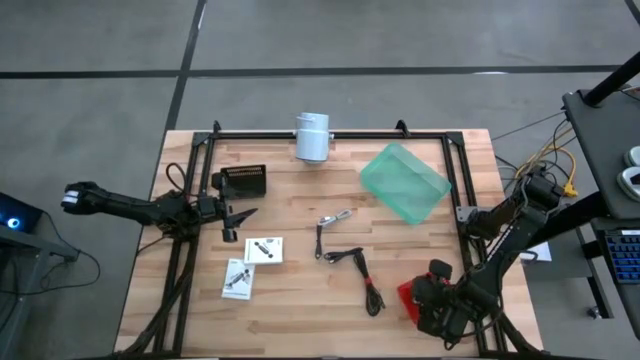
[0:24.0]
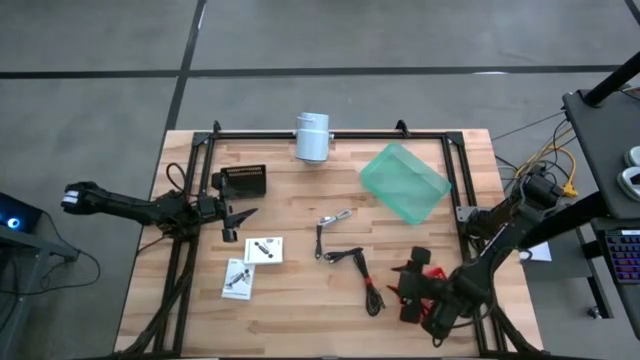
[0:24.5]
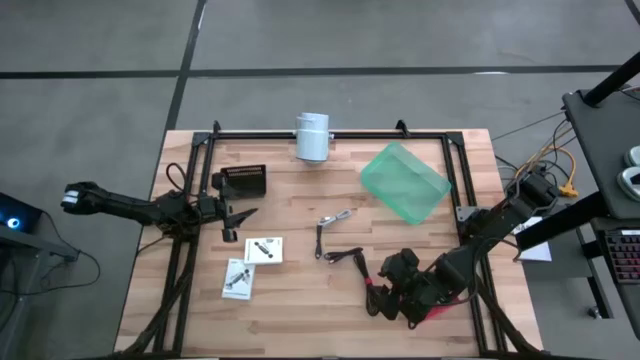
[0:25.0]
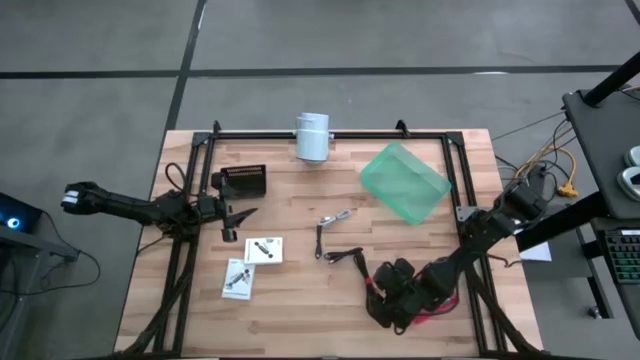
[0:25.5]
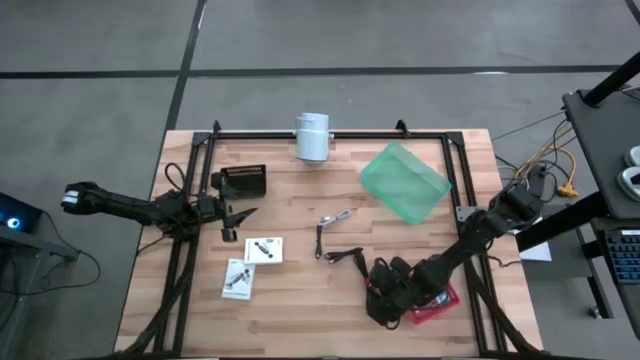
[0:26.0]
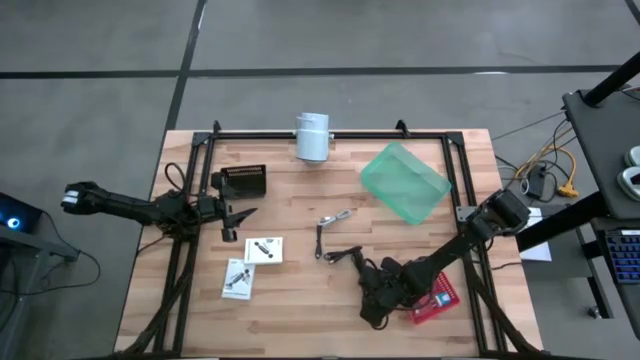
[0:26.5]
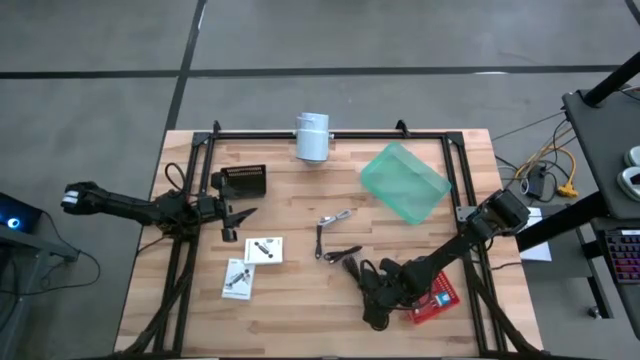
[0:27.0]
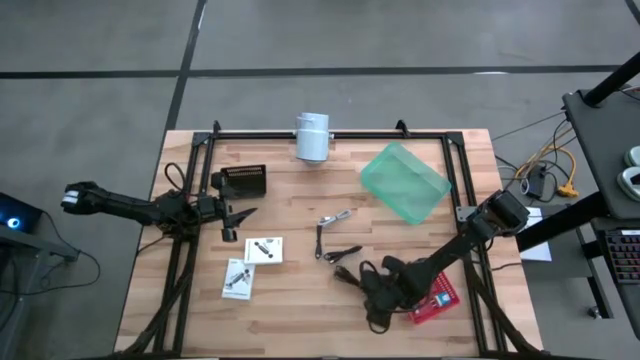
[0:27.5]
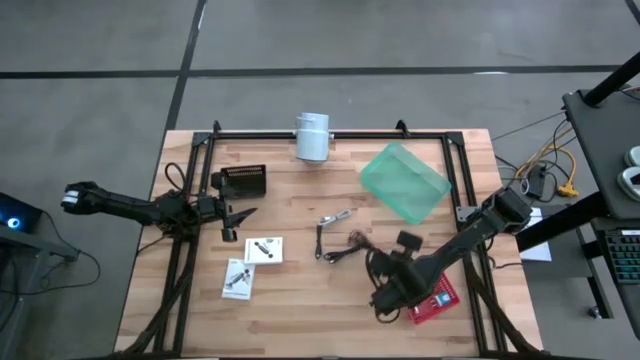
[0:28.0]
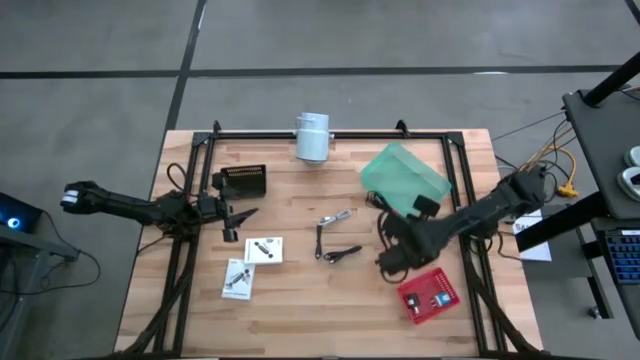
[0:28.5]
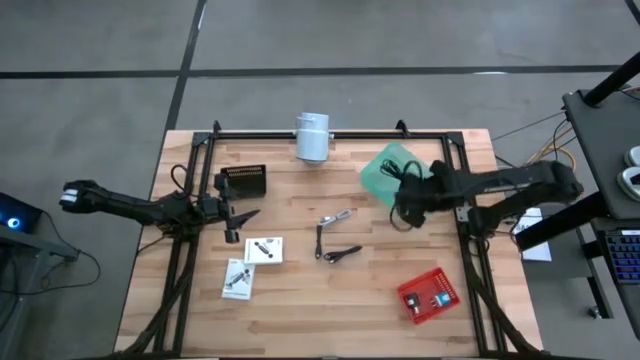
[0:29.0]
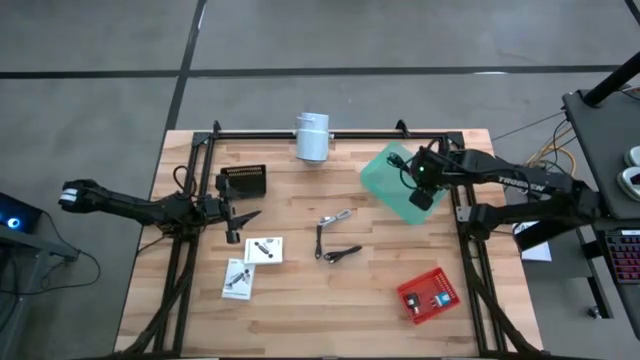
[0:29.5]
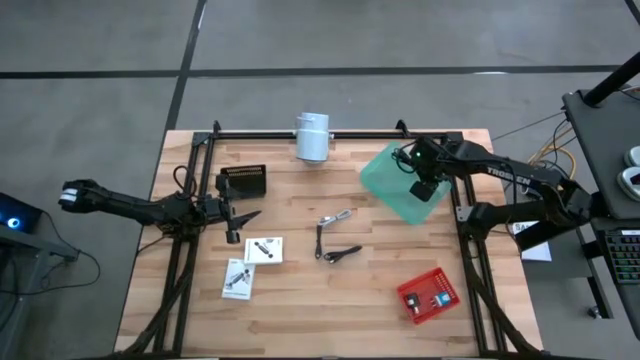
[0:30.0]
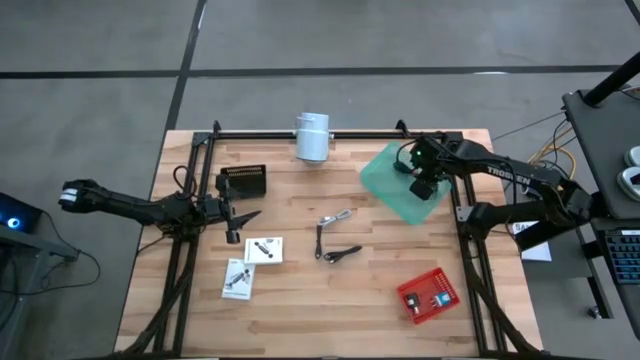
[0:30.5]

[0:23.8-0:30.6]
Task: Pick and place items into bin
Put the bottom black charger cable into the green bin

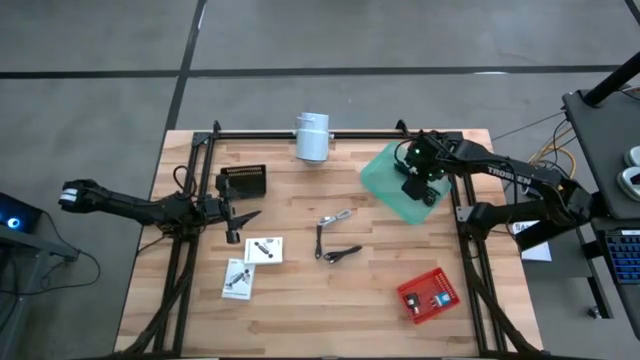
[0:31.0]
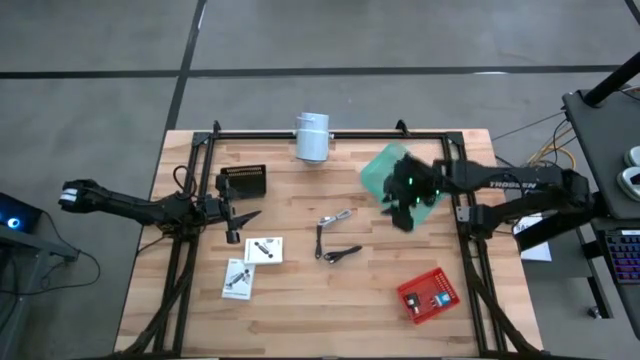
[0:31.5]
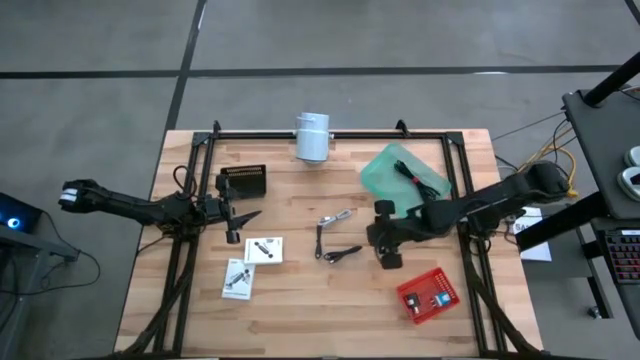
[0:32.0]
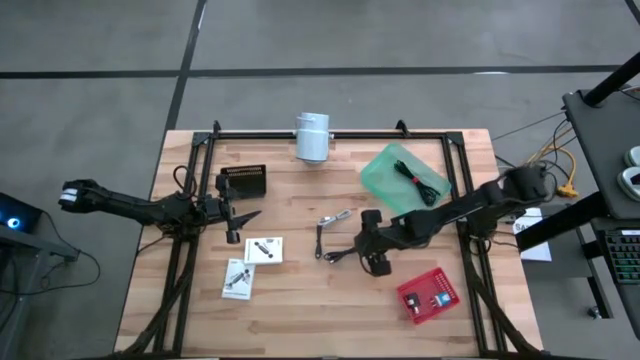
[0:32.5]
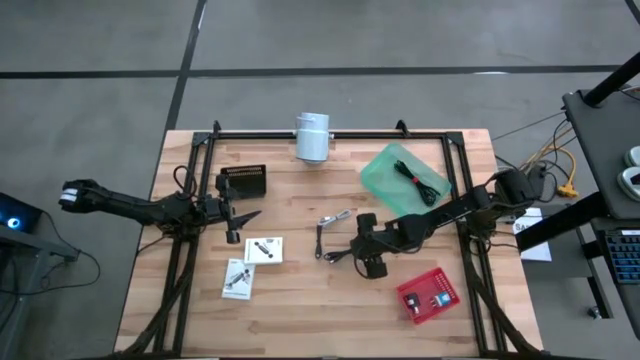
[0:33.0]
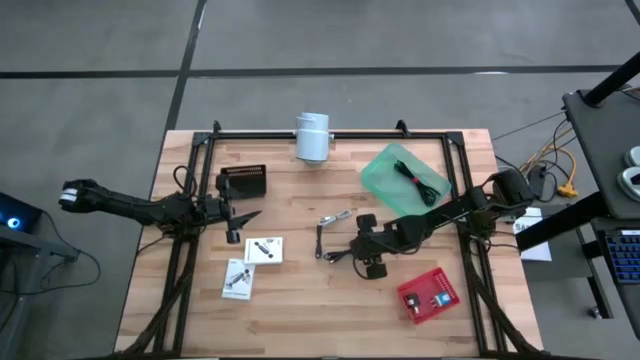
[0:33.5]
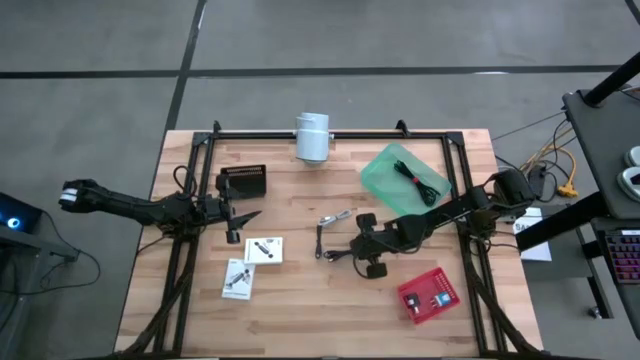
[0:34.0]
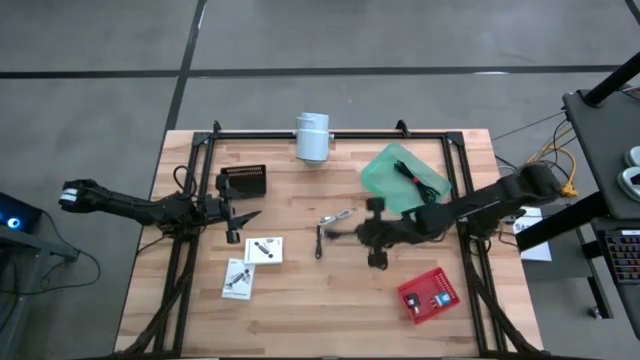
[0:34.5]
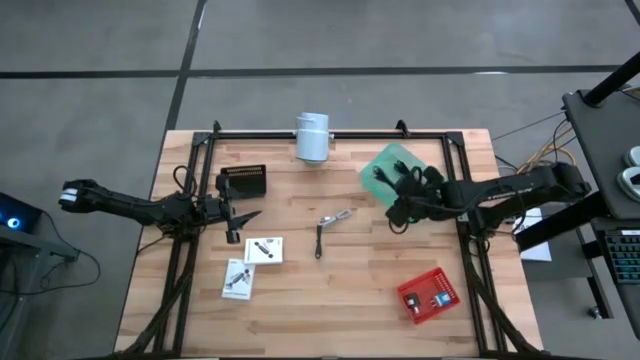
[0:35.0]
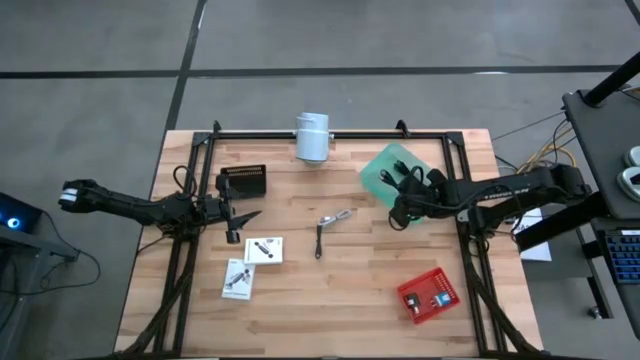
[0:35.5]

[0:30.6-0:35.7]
Put the right black charger cable into the green bin

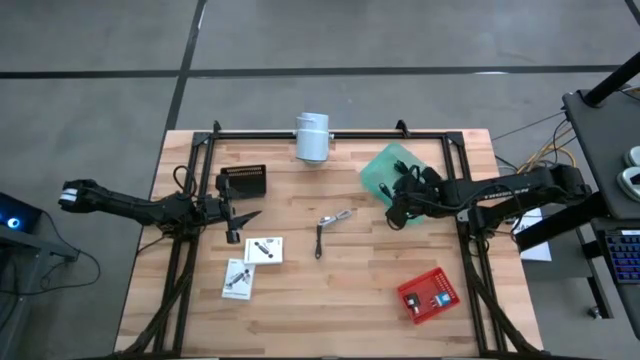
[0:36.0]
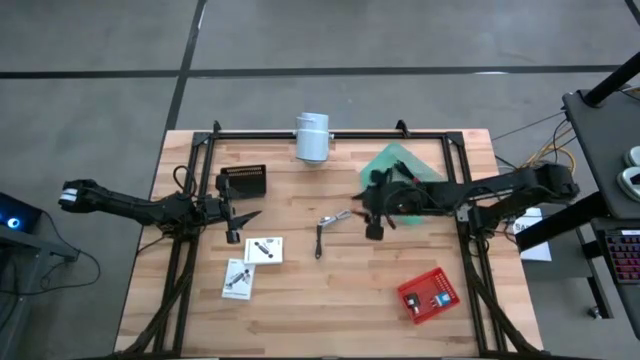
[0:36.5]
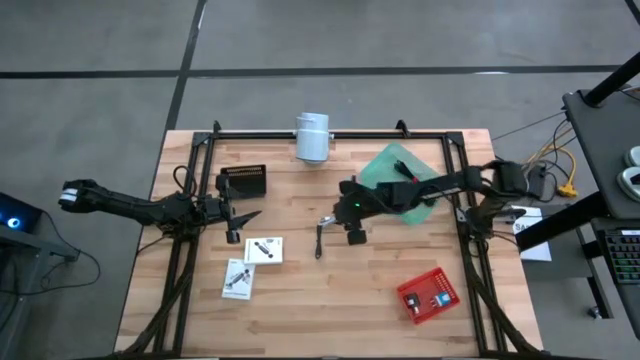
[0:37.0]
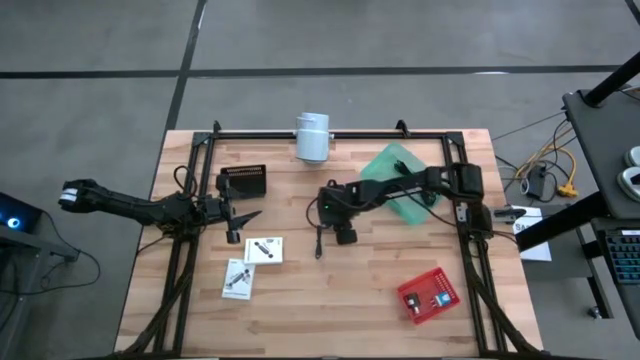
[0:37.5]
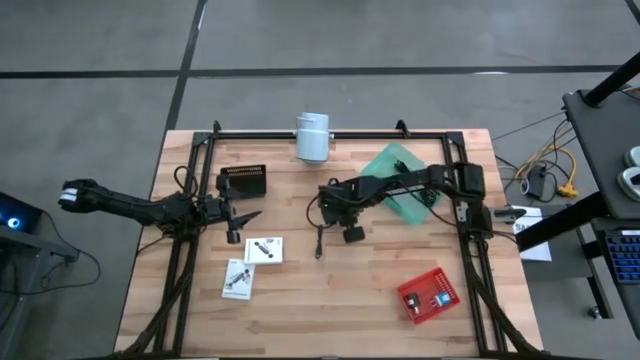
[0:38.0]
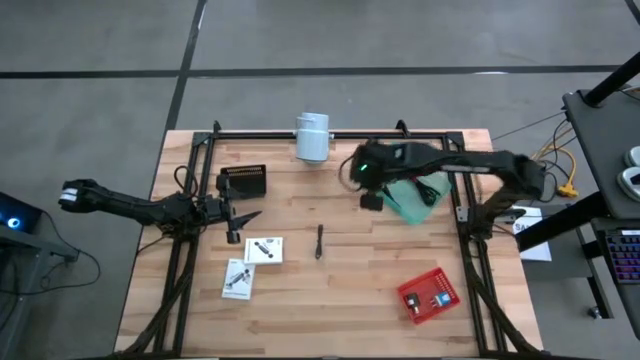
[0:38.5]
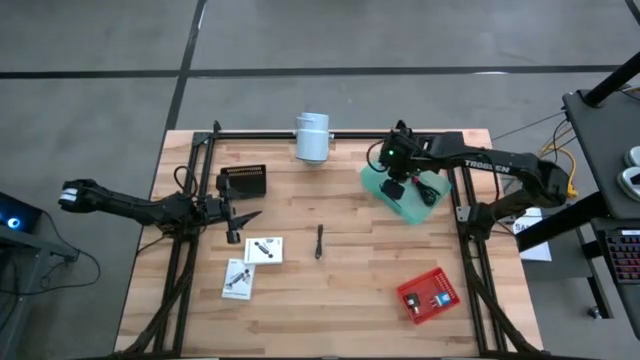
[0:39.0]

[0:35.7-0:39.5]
Put the white charger cable into the green bin

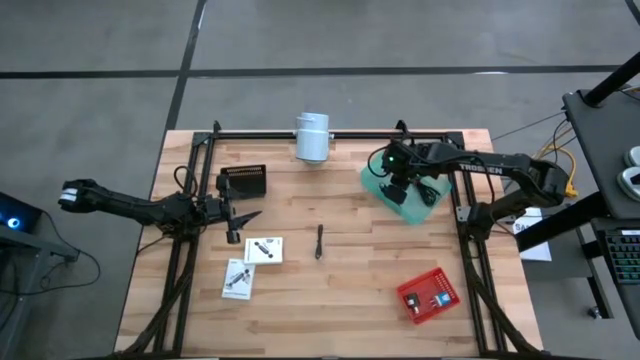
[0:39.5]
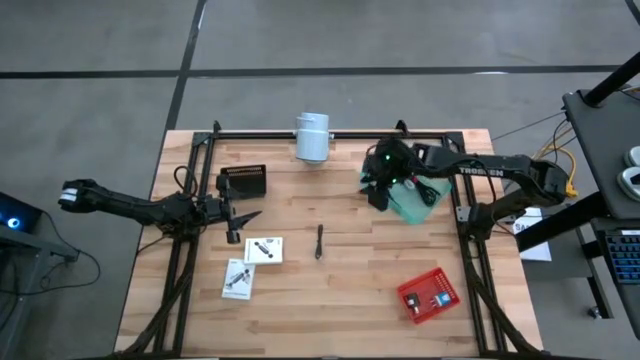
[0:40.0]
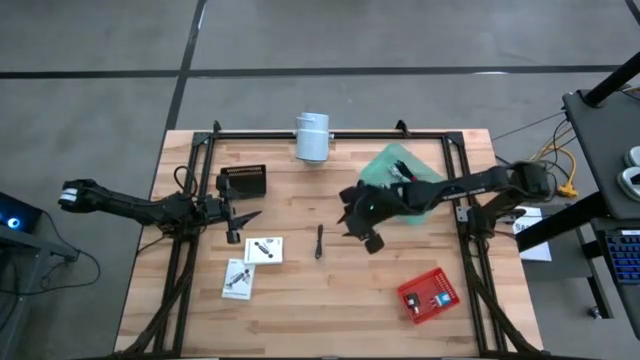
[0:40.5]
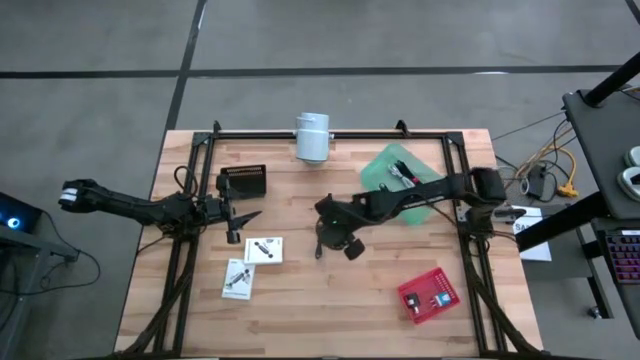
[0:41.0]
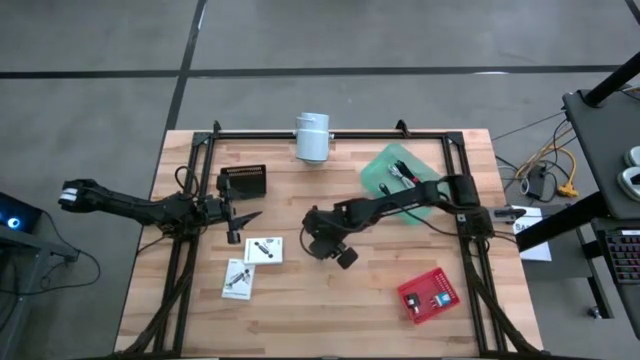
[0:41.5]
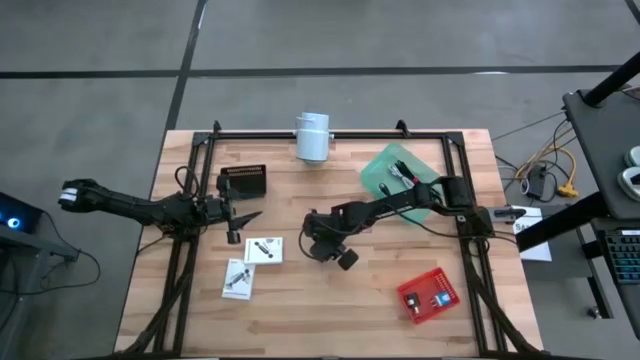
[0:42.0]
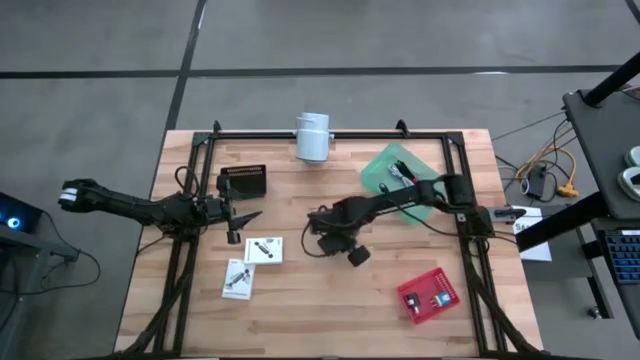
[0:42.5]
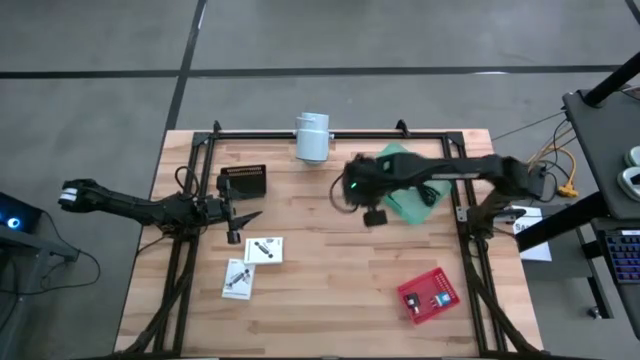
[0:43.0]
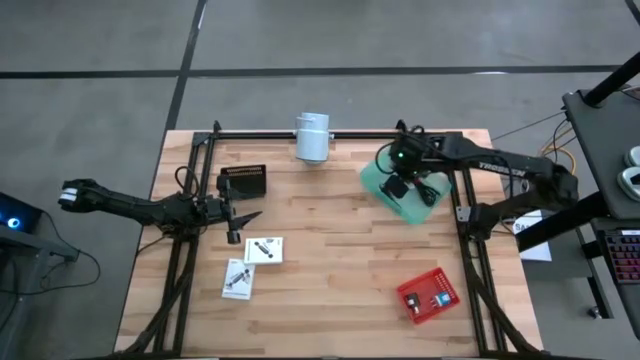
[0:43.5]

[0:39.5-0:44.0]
Put the black charger cable into the green bin

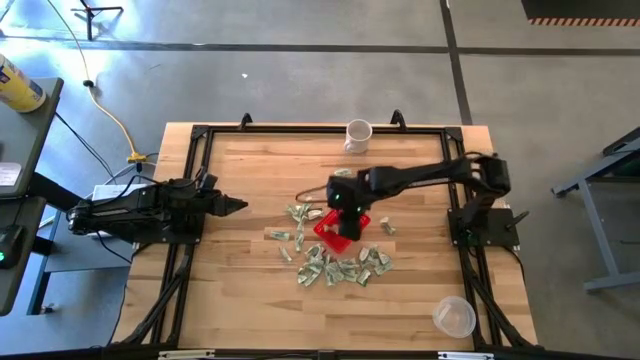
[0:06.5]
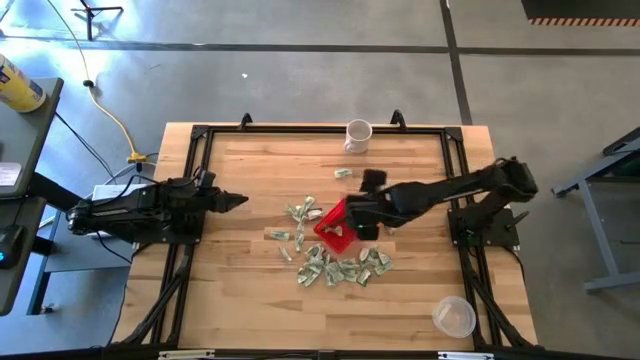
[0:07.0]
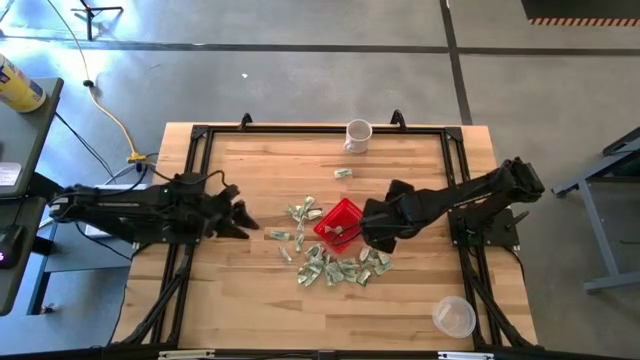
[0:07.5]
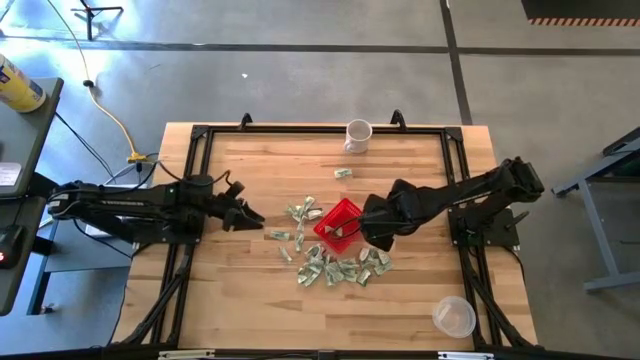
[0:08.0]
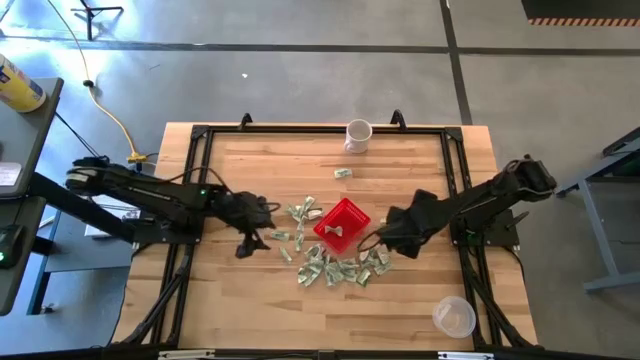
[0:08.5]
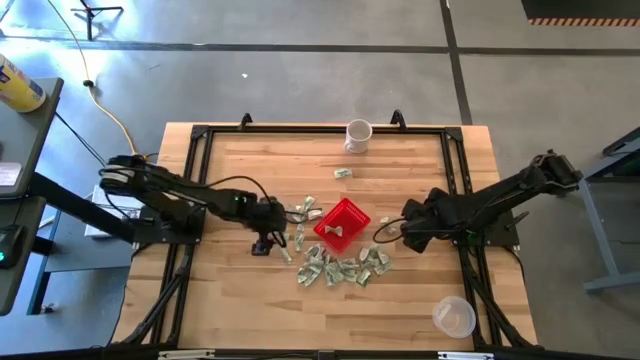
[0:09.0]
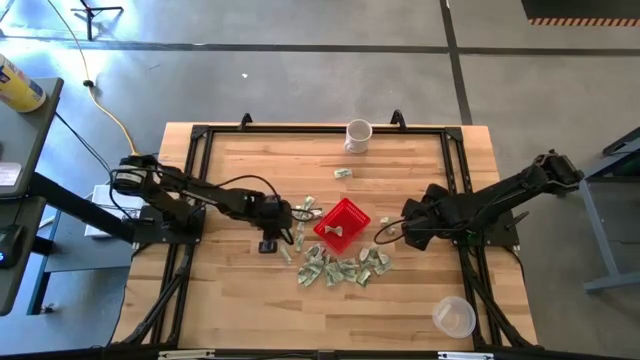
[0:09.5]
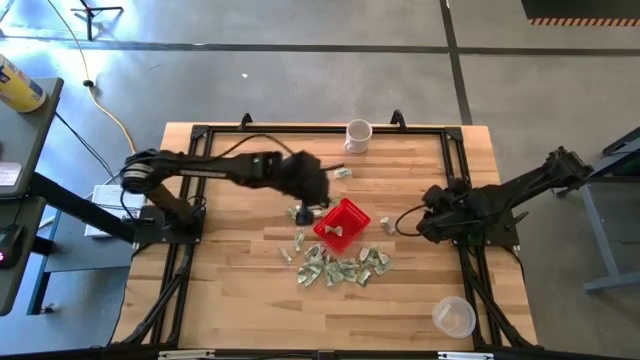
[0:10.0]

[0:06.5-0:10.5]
Task: Pick and place items into bin
Put the white stevia packet into the red bin
